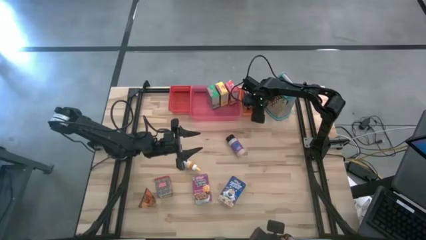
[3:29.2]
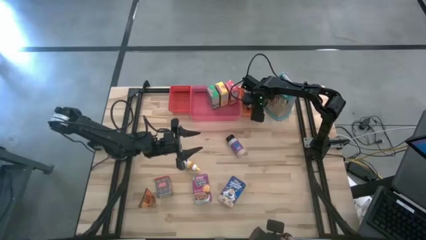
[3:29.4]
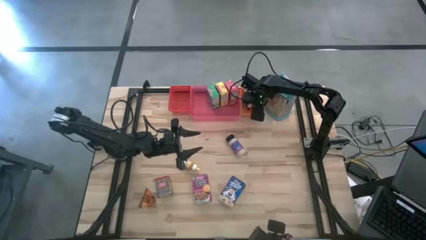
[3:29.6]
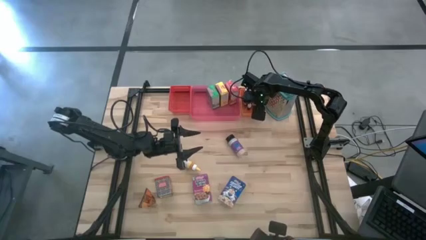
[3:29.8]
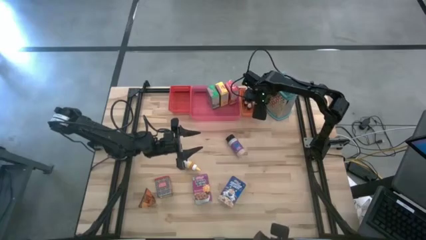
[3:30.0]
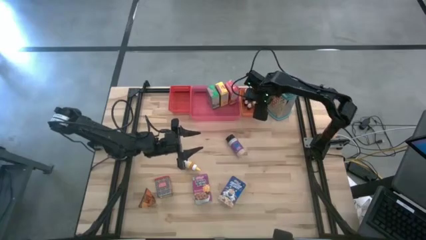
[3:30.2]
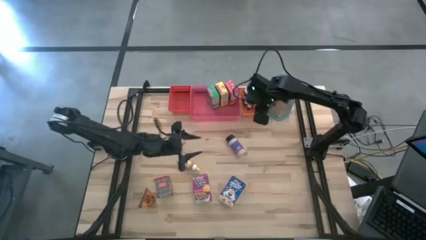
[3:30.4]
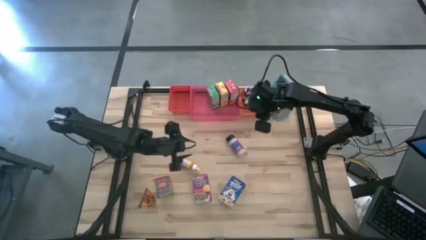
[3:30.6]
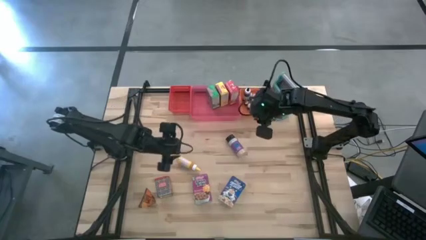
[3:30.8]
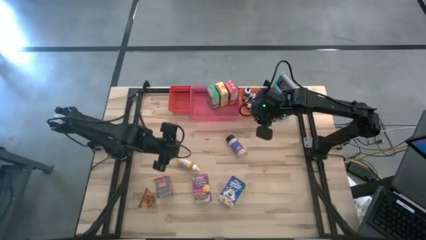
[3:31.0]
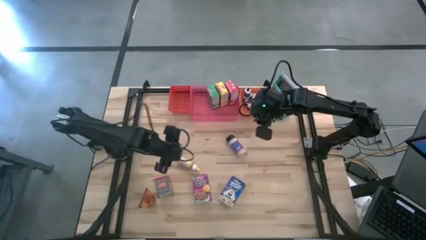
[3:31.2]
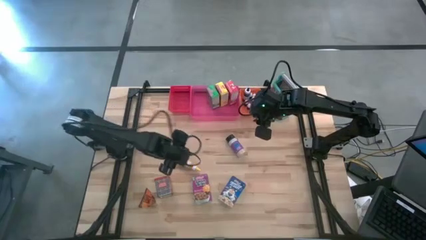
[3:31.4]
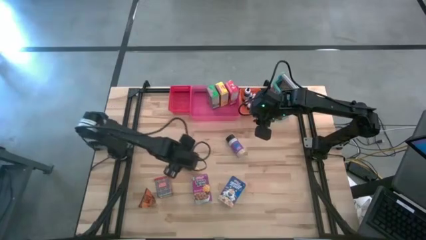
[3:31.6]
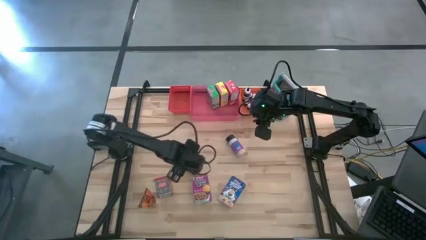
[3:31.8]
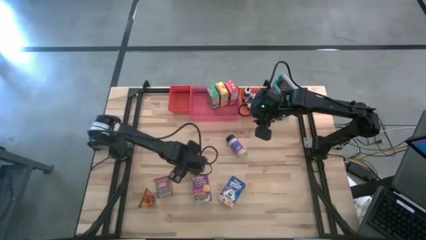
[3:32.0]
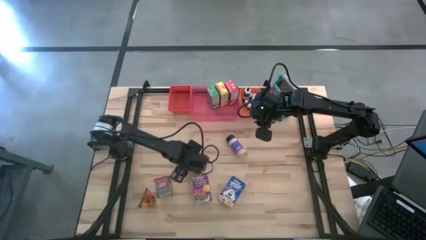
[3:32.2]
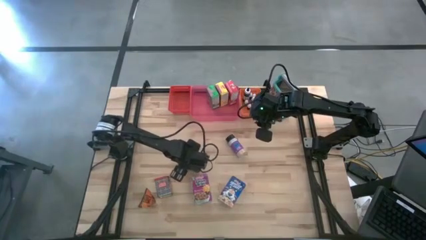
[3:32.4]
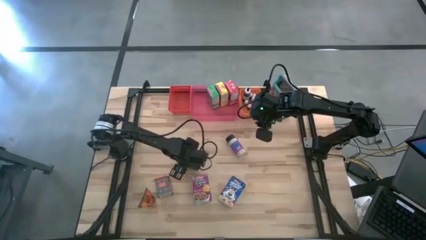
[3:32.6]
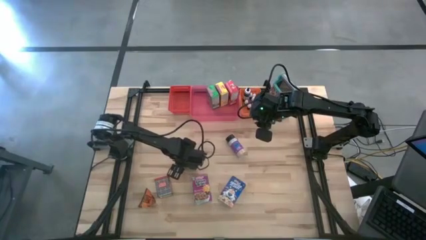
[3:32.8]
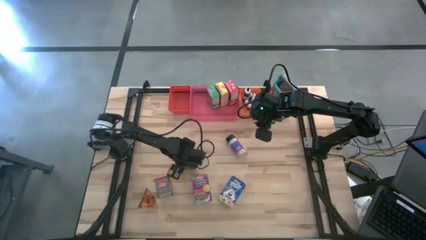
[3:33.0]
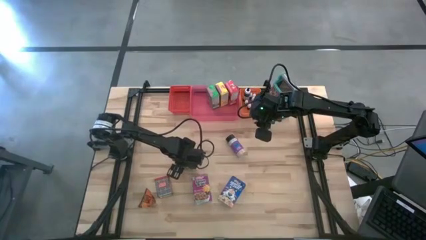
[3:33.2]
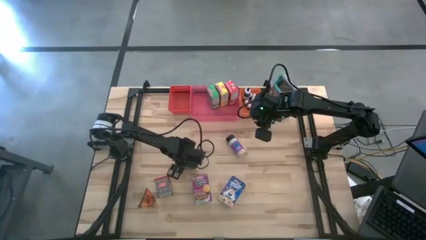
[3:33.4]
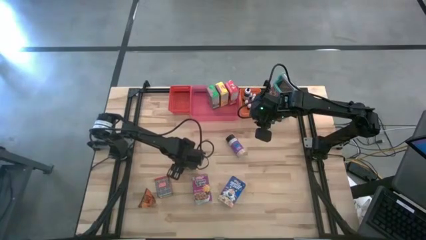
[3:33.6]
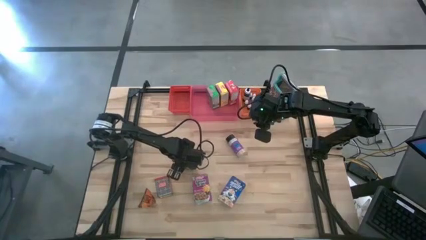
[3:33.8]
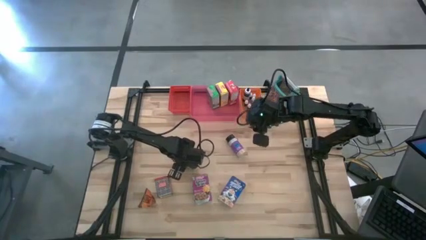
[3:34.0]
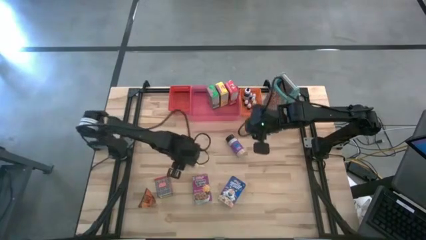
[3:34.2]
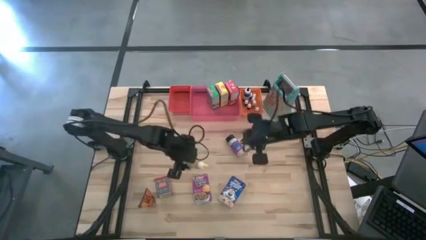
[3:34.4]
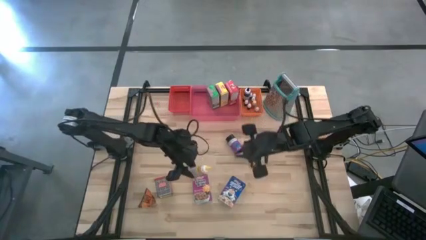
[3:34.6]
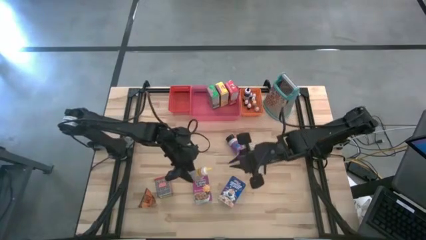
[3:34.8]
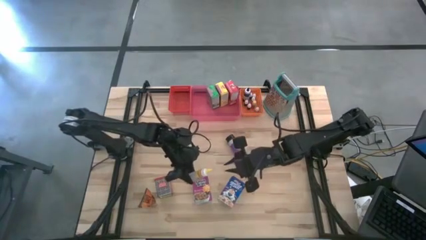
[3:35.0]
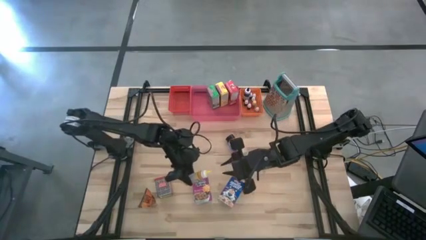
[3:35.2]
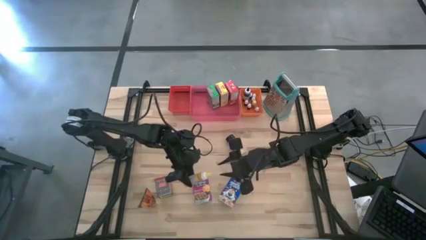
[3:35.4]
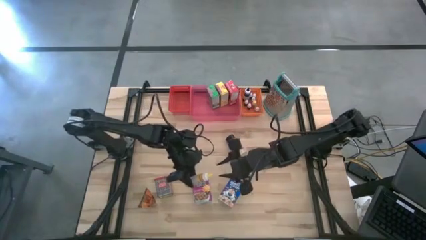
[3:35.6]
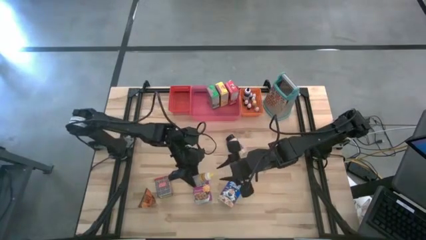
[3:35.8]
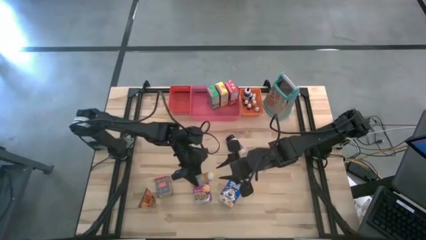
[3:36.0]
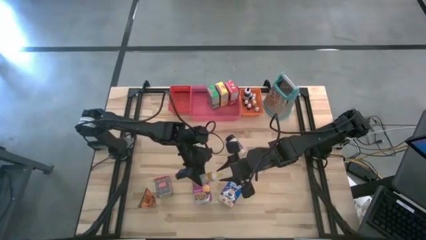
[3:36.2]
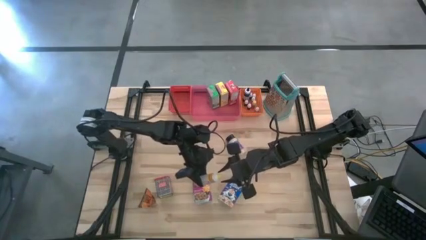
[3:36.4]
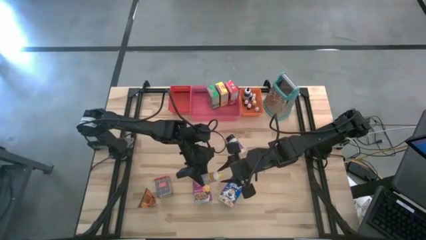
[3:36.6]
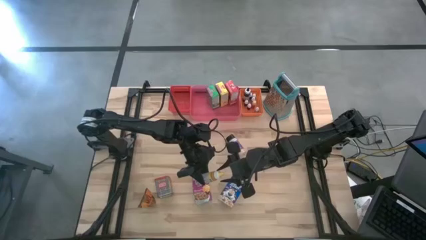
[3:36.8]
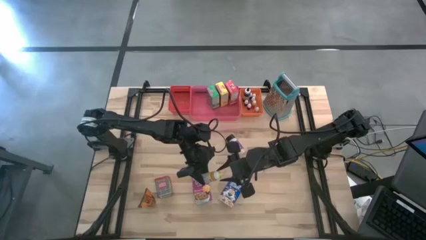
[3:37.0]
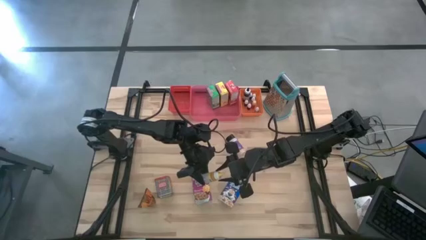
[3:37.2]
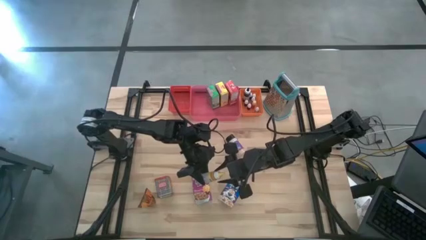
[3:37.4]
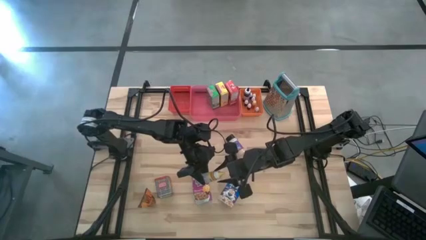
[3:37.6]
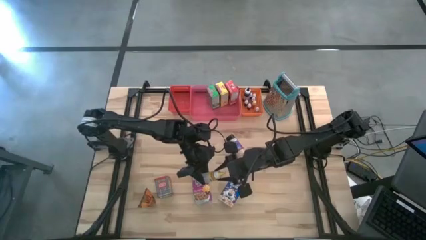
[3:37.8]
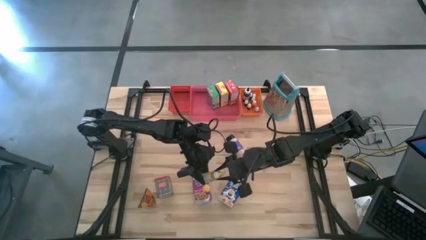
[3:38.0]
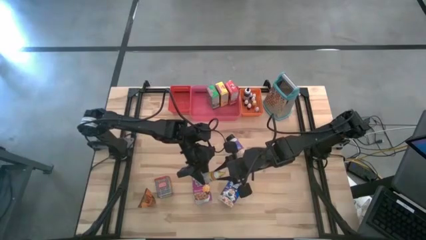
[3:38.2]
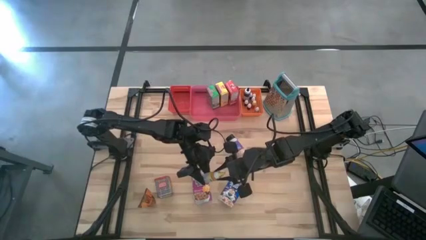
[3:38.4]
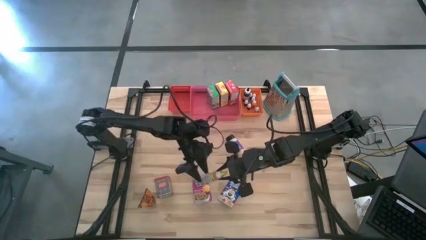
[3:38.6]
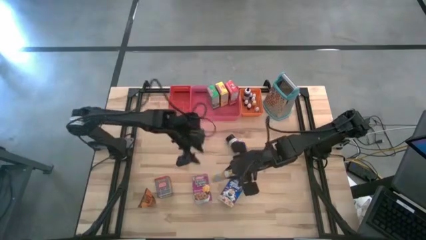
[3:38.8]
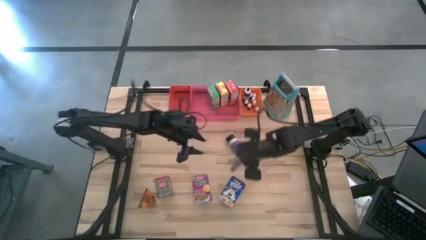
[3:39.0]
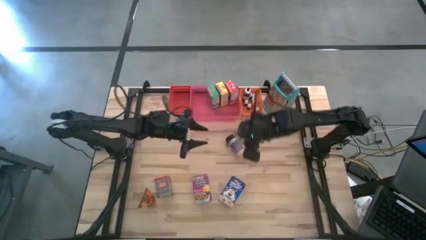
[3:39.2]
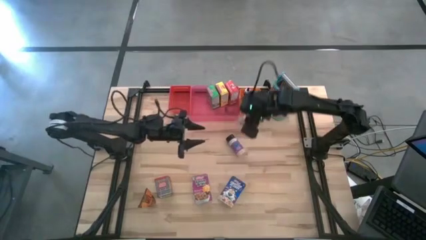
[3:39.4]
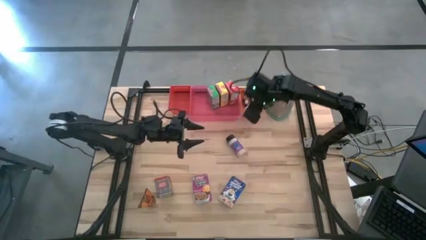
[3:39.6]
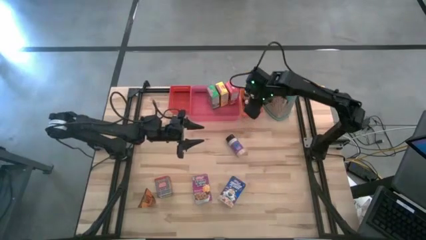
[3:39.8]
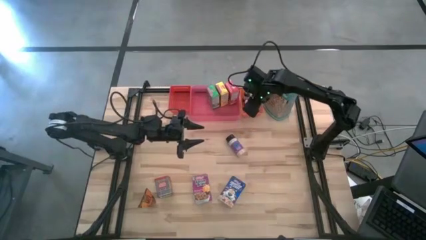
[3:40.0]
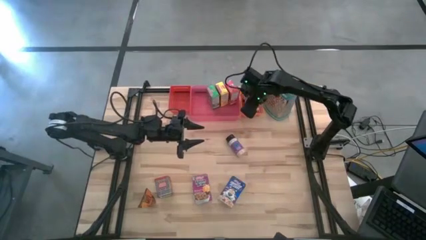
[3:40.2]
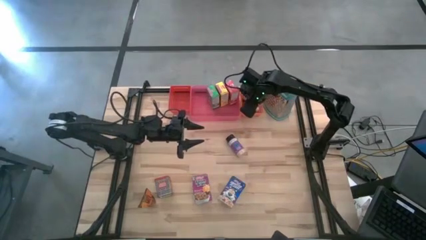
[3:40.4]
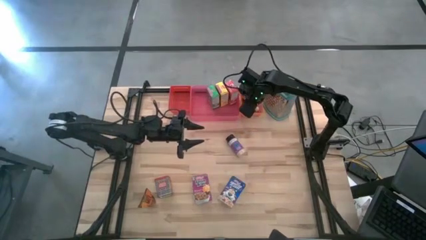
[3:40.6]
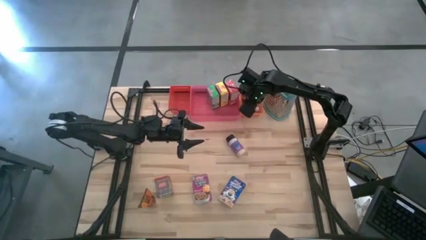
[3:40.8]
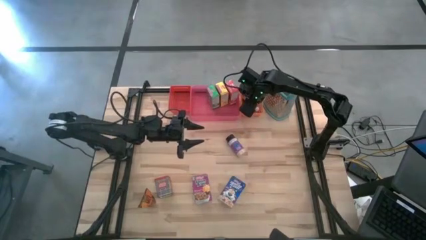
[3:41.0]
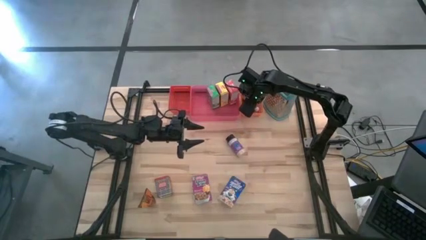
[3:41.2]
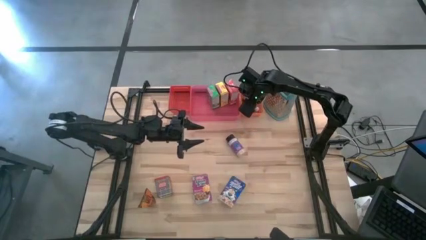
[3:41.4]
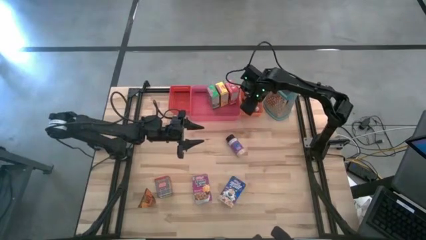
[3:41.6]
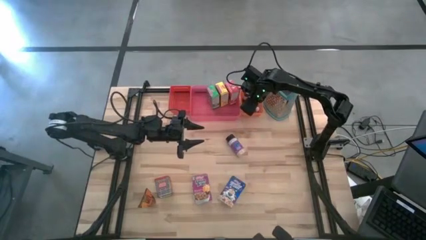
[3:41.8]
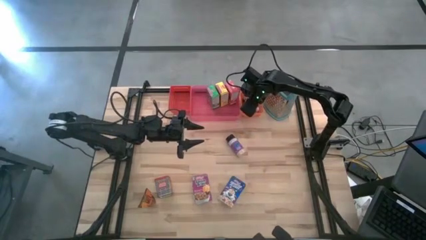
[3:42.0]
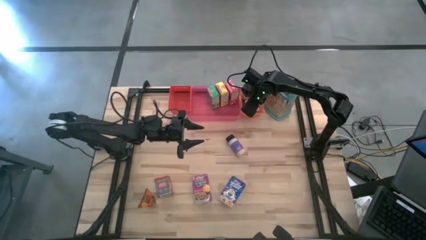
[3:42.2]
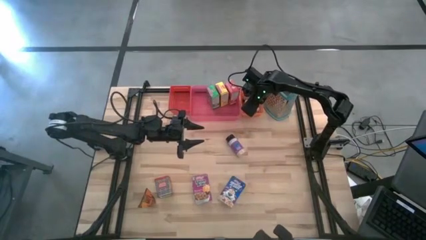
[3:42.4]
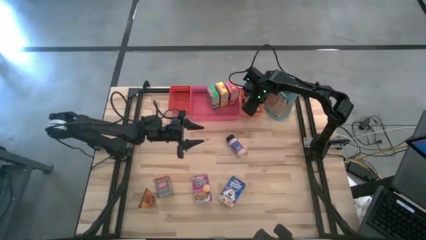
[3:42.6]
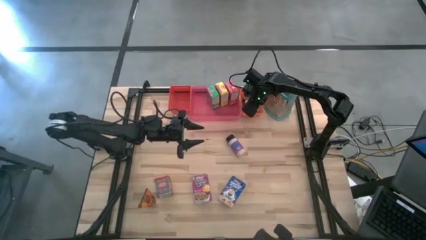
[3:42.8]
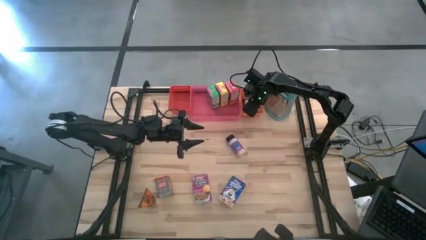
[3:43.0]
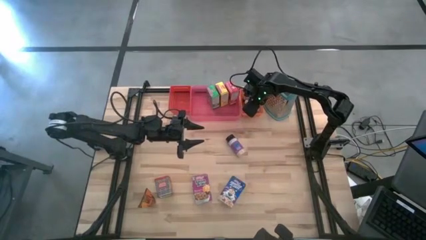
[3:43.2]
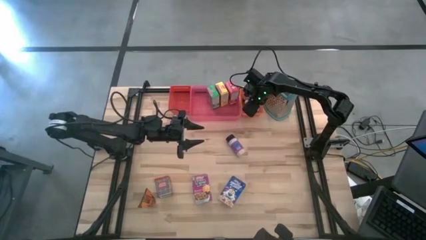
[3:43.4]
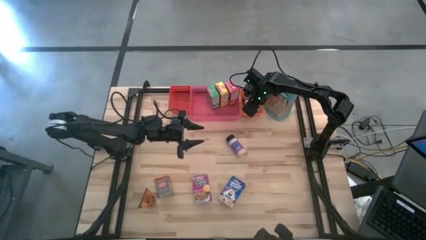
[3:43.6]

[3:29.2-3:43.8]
Task: Pick & Place Kitchen Items
Put the yellow food coloring bottle into the orange bin
